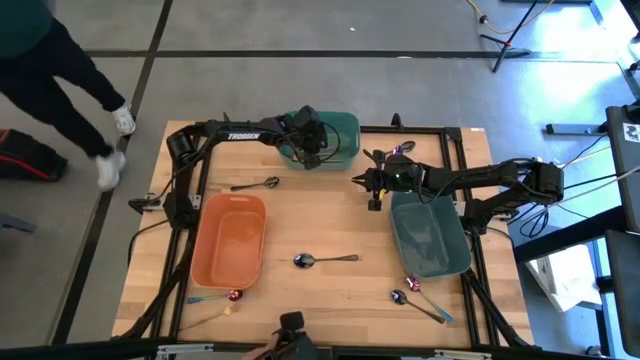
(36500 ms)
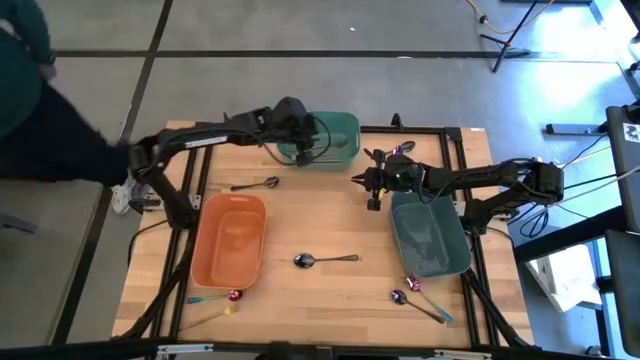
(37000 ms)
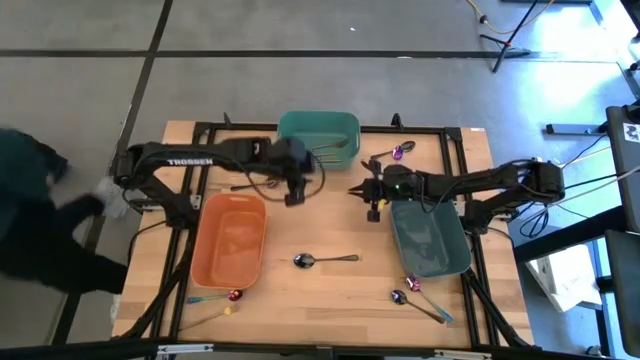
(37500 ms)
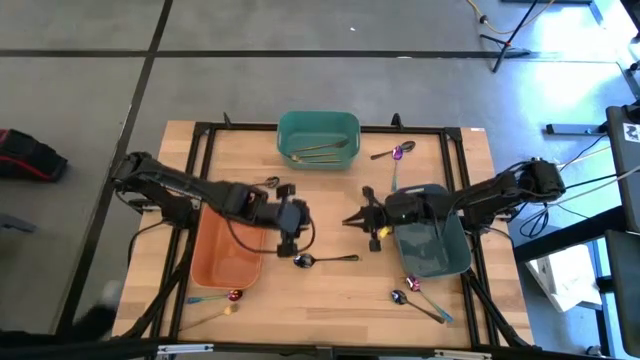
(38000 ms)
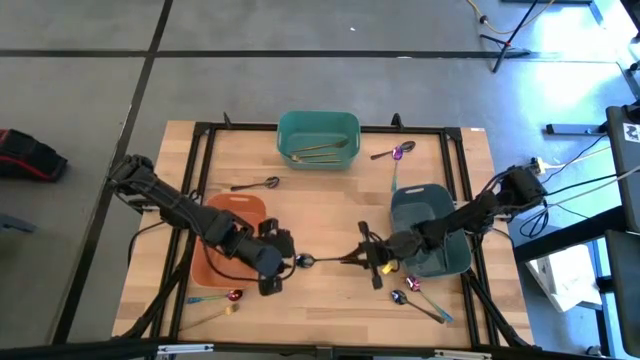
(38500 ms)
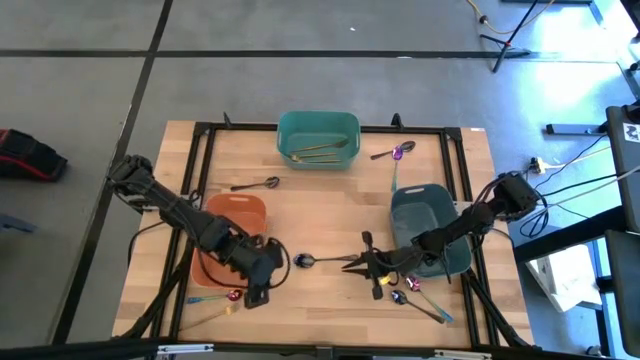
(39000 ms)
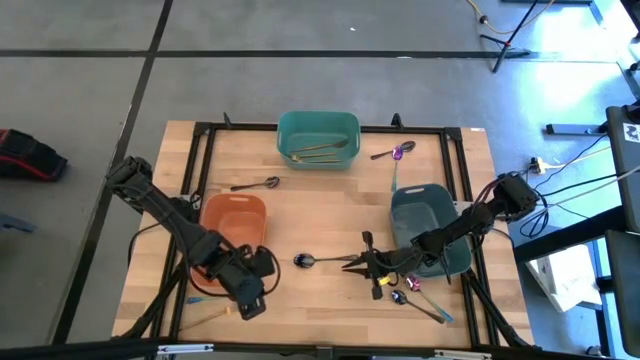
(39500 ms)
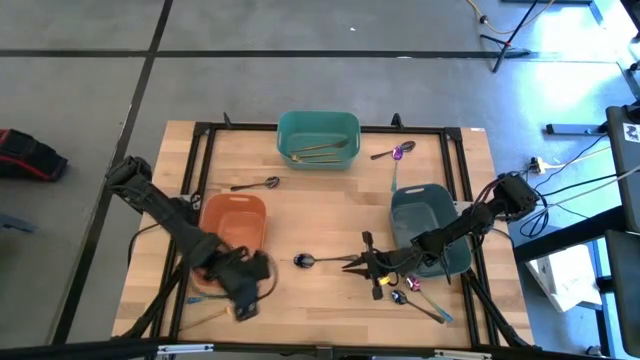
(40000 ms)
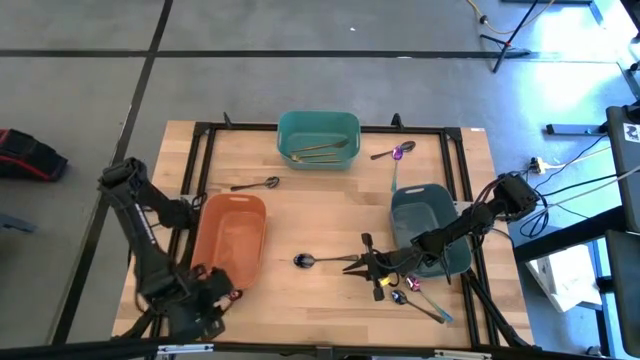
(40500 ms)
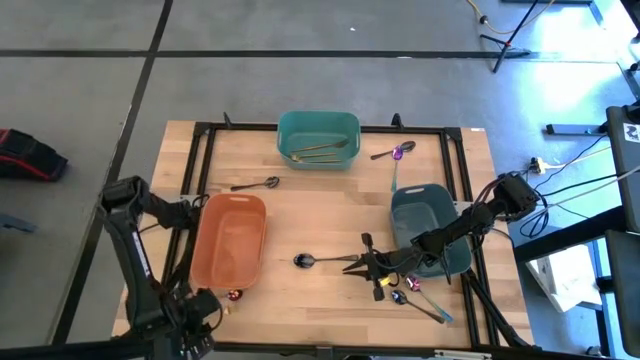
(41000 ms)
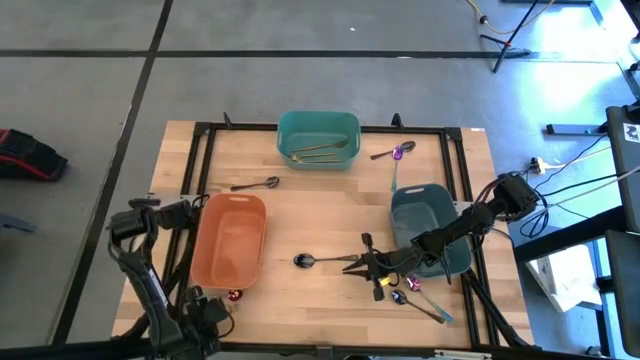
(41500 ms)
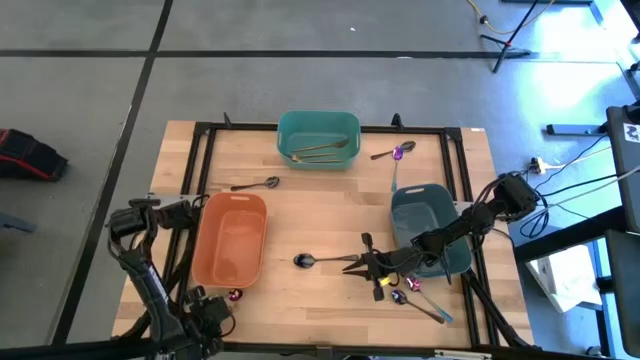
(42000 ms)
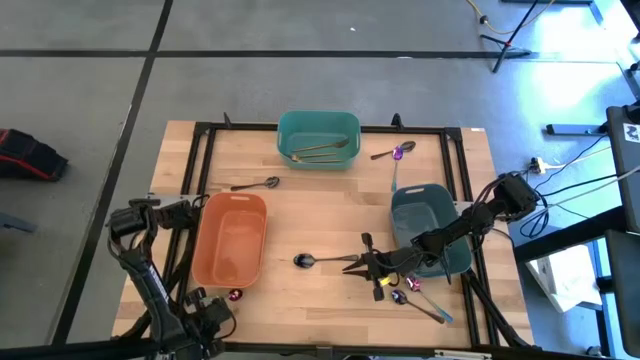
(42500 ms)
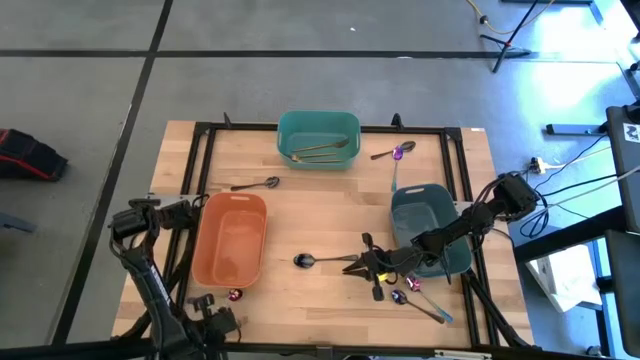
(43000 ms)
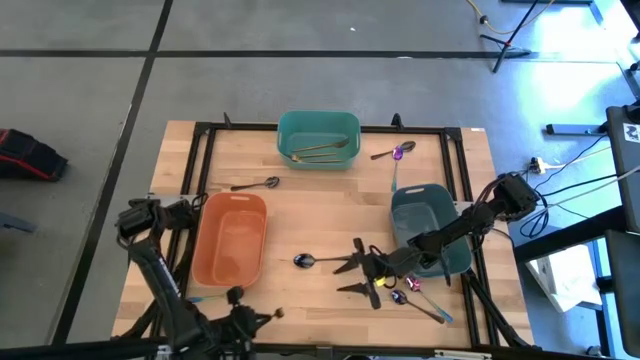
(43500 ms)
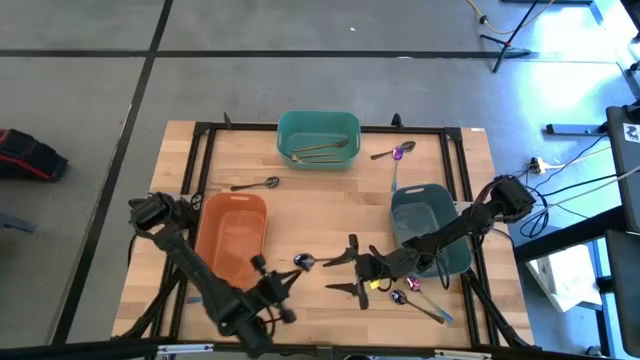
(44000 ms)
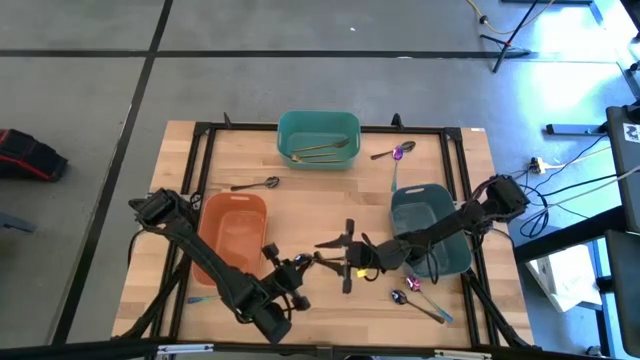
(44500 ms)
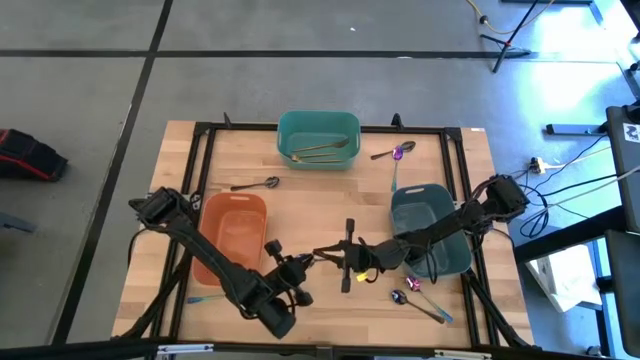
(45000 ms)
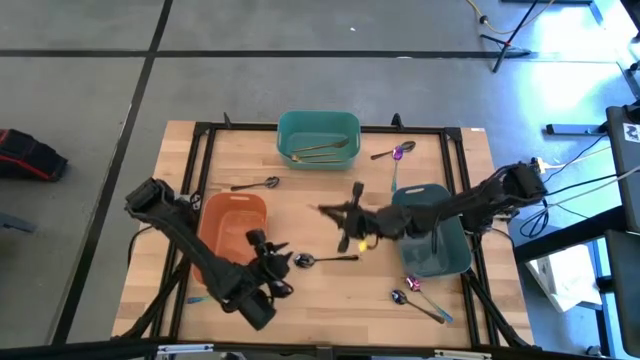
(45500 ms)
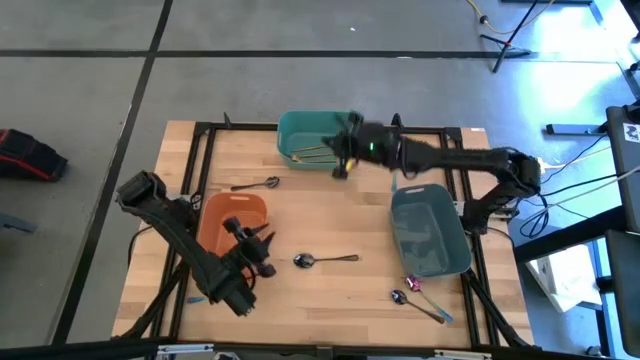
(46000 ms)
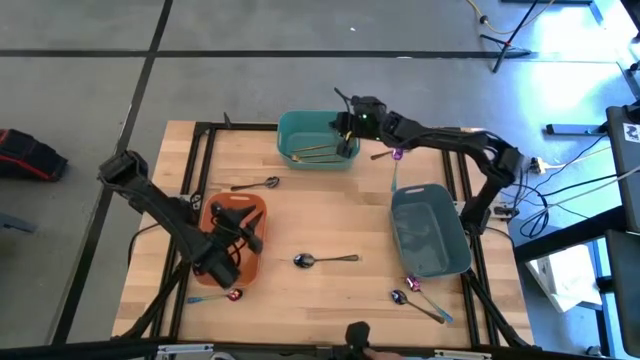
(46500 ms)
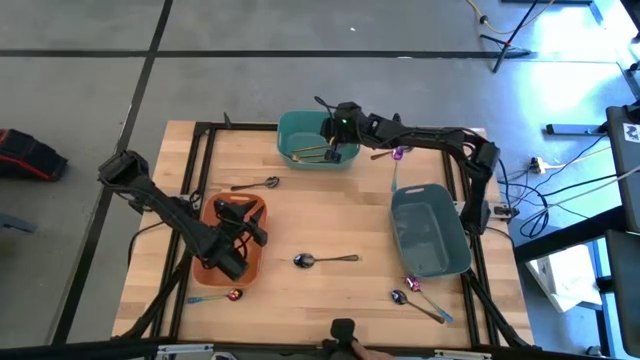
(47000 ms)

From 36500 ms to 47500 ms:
Task: Sort silverware by color (type)
Put the gold fork into the green bin

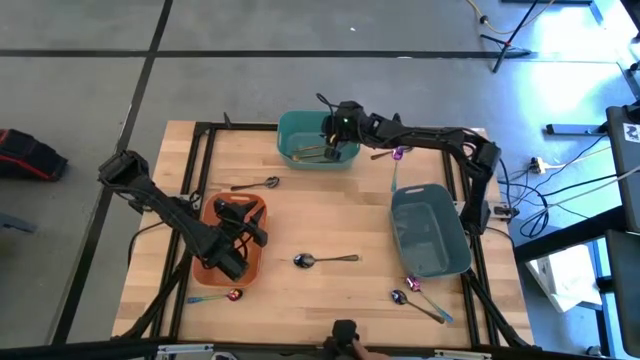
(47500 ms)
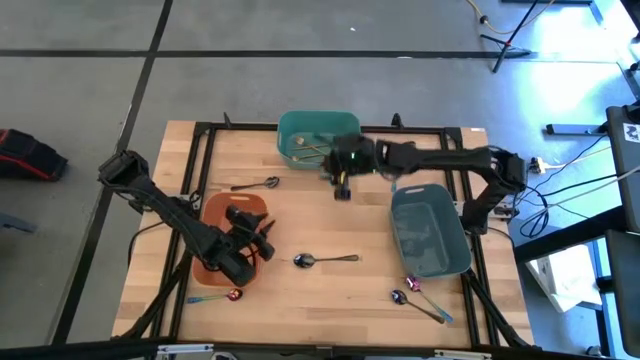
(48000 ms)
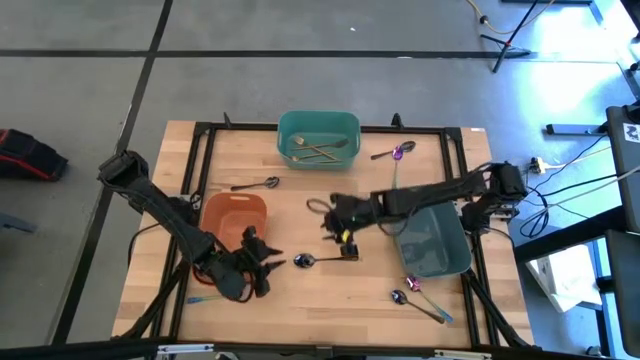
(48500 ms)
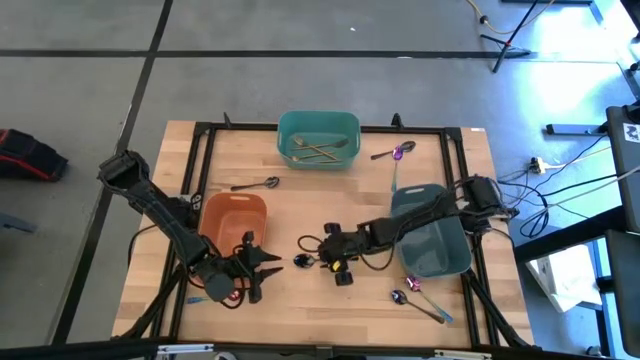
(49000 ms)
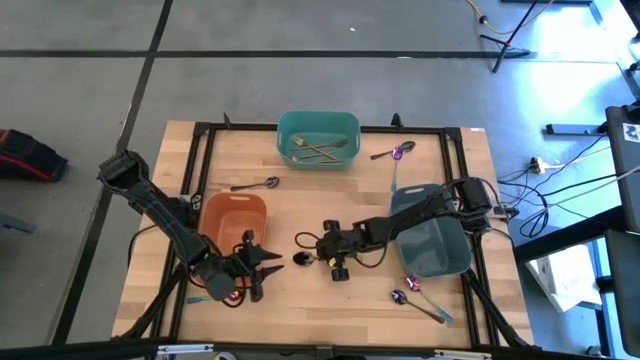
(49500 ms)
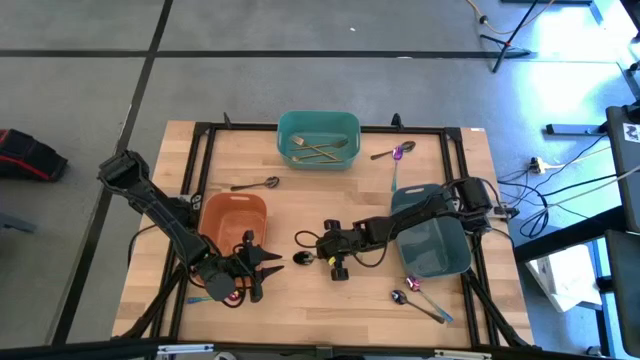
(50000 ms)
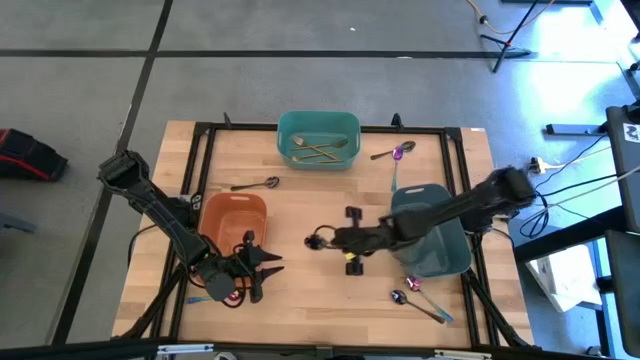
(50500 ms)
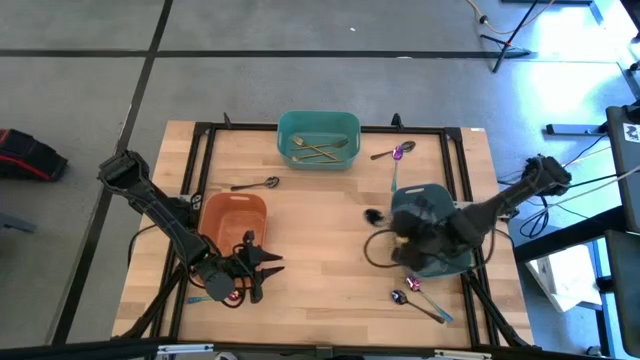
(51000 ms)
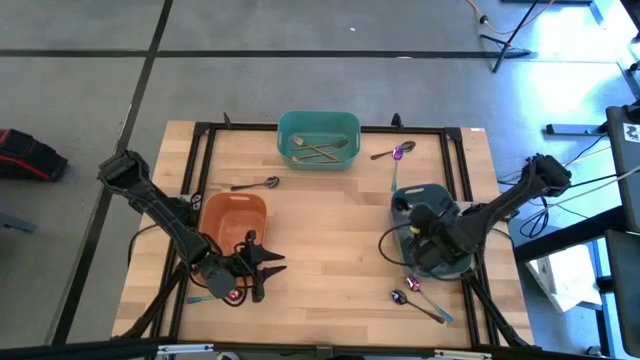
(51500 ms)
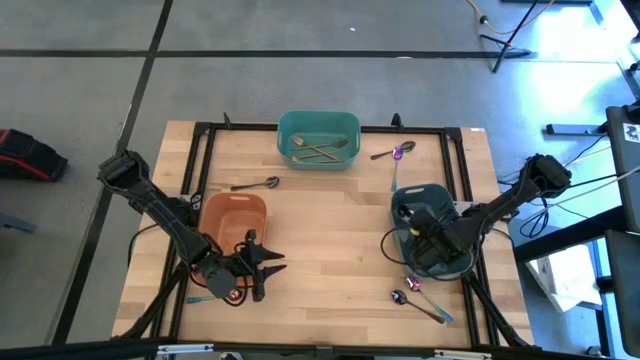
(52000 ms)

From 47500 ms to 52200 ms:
Put the black spoon into the blue bin

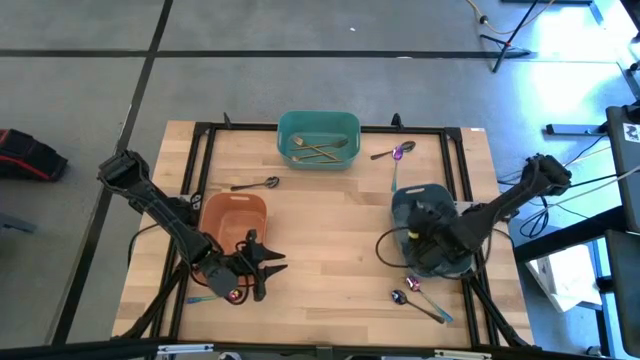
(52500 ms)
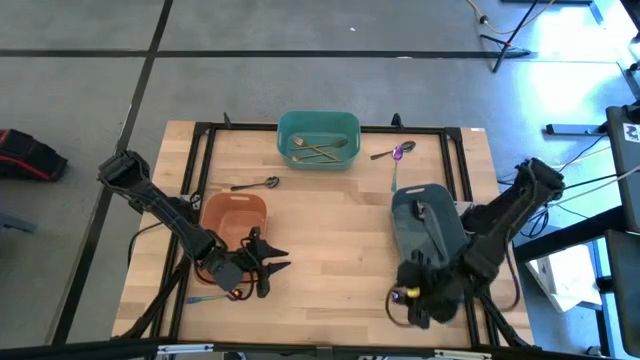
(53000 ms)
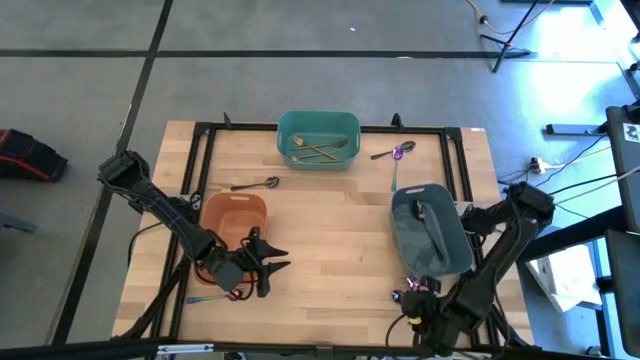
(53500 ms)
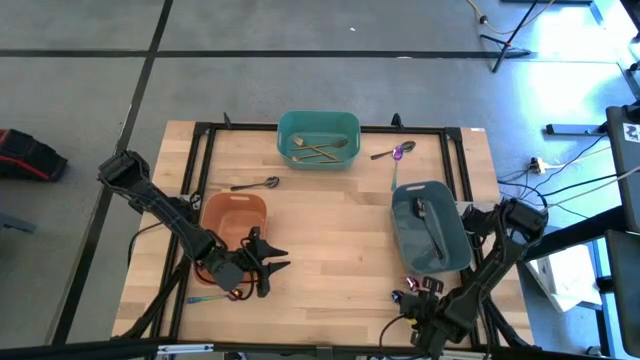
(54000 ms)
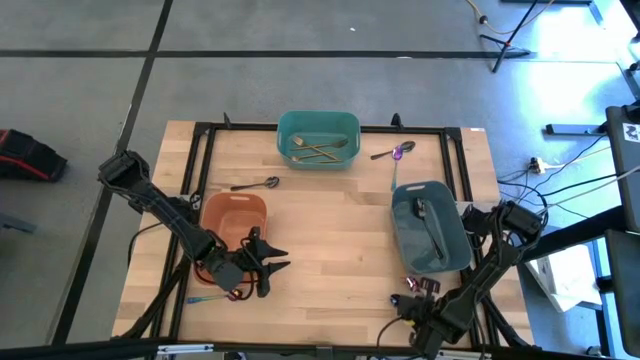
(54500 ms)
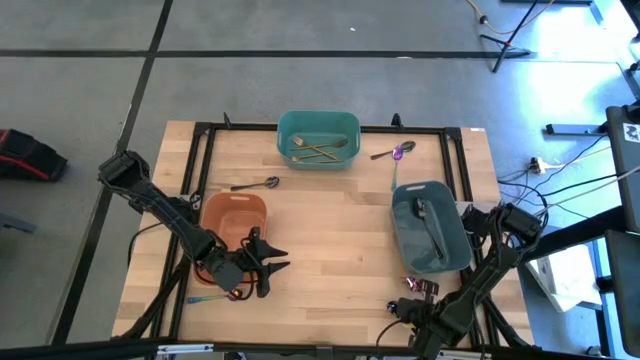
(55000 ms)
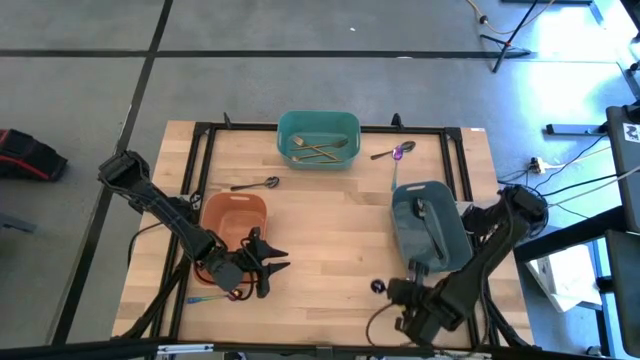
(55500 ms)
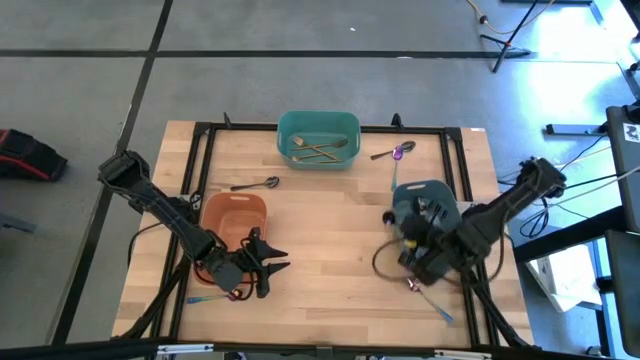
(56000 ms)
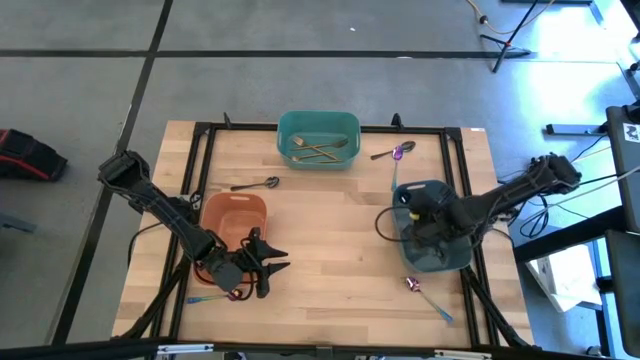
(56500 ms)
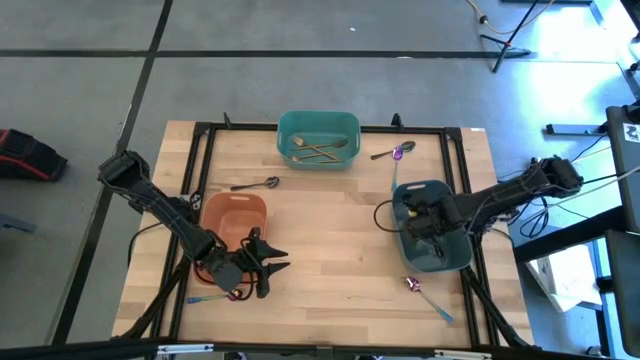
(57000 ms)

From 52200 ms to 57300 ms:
Put the black spoon into the blue bin
